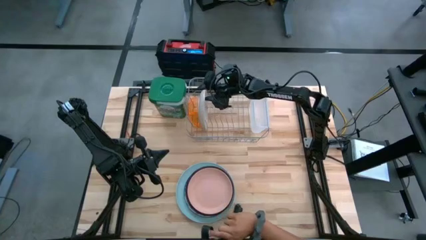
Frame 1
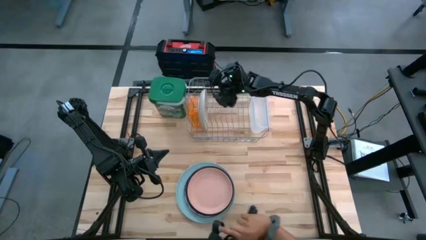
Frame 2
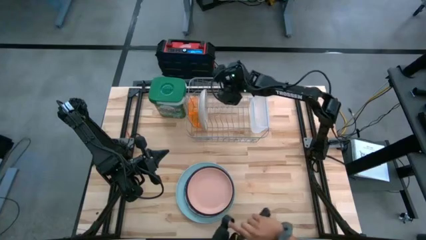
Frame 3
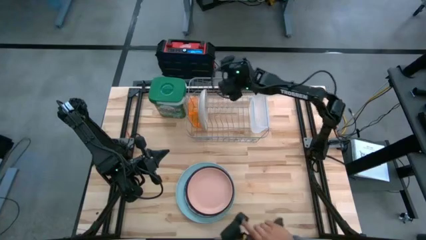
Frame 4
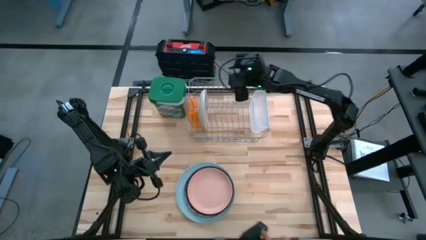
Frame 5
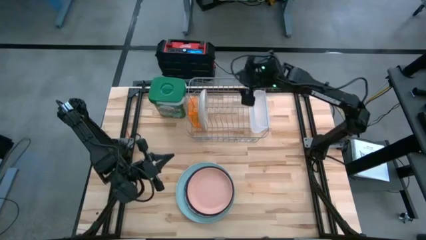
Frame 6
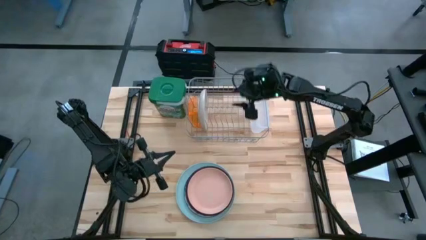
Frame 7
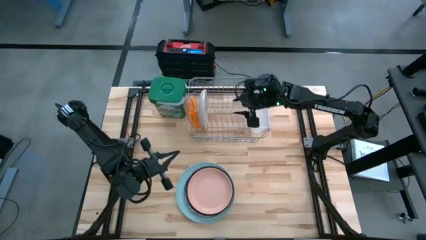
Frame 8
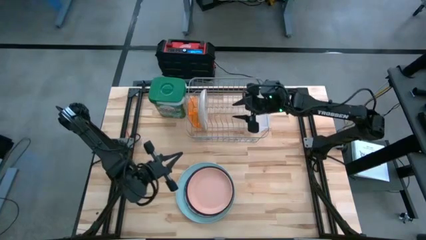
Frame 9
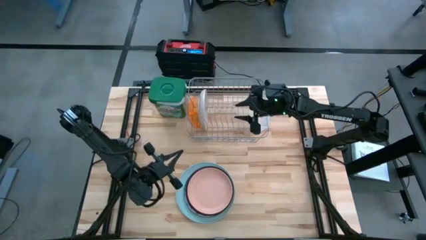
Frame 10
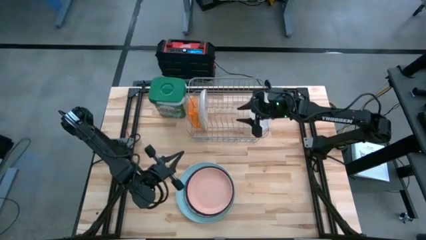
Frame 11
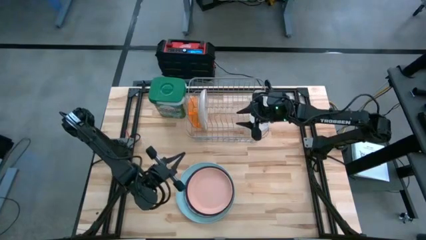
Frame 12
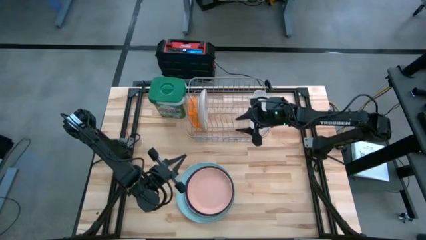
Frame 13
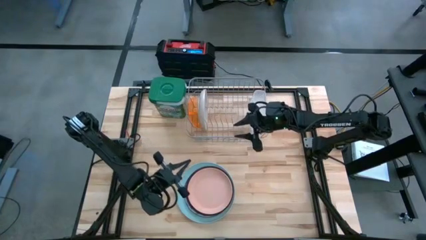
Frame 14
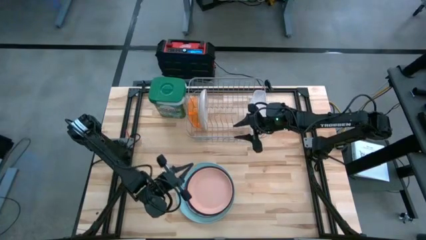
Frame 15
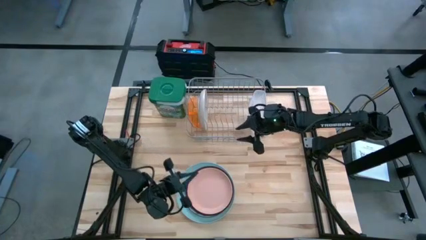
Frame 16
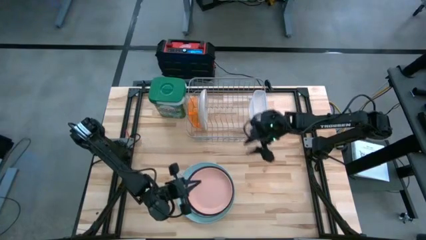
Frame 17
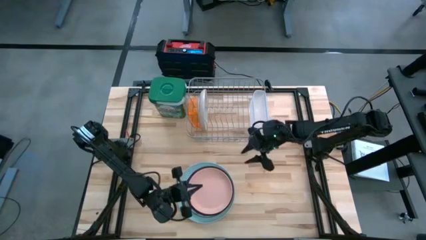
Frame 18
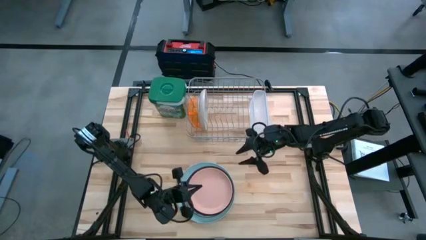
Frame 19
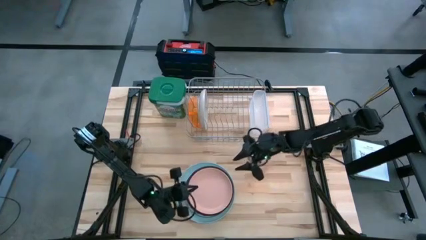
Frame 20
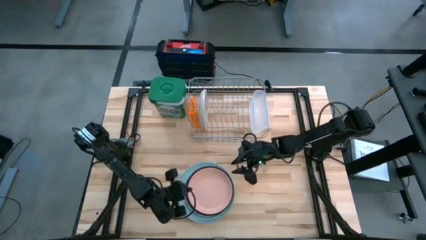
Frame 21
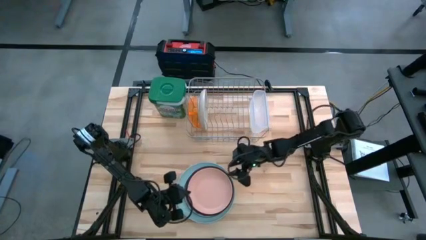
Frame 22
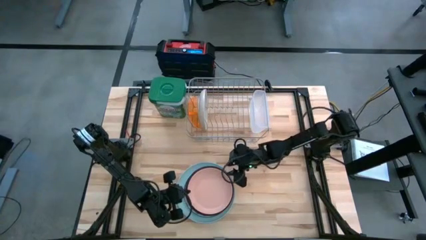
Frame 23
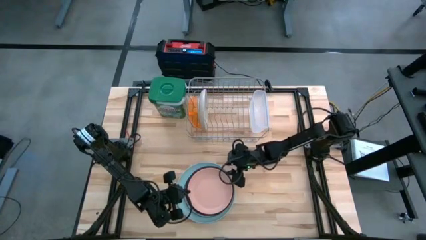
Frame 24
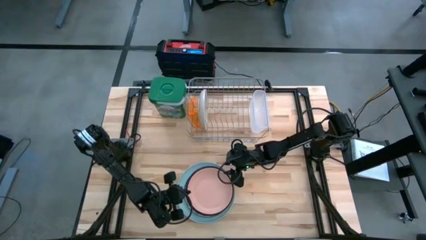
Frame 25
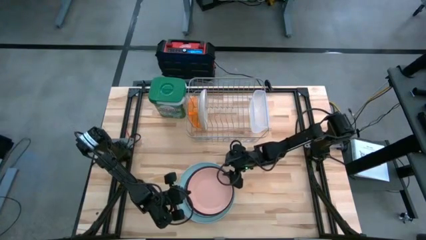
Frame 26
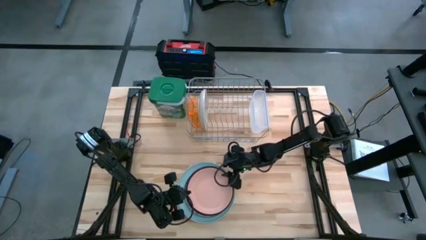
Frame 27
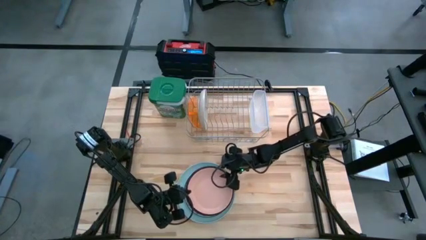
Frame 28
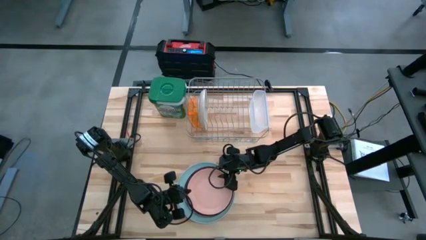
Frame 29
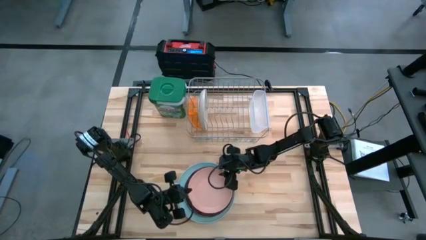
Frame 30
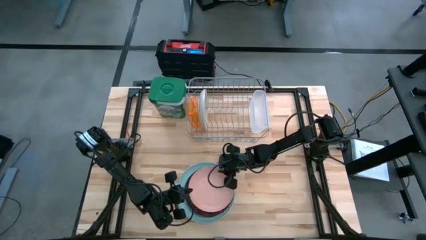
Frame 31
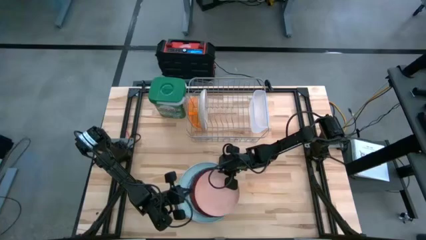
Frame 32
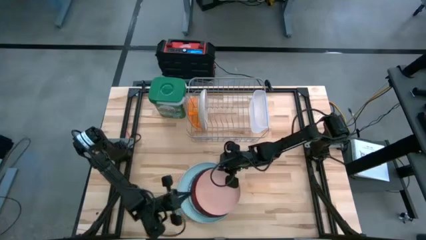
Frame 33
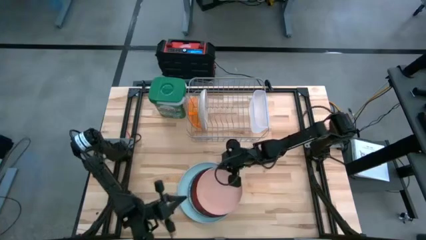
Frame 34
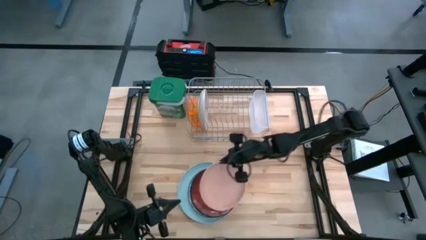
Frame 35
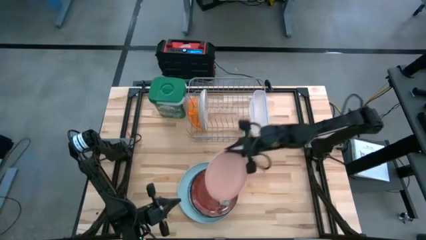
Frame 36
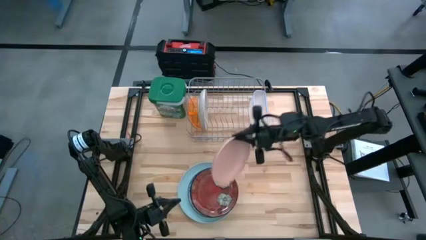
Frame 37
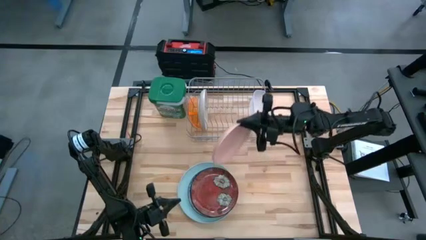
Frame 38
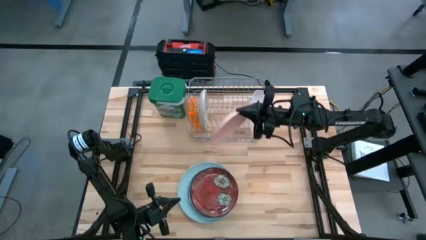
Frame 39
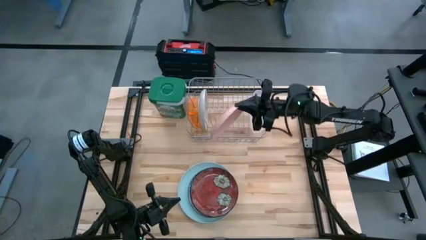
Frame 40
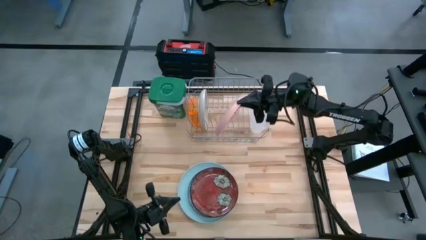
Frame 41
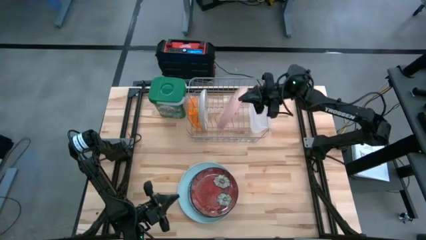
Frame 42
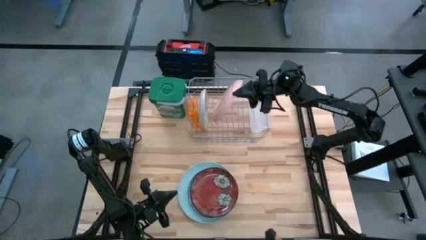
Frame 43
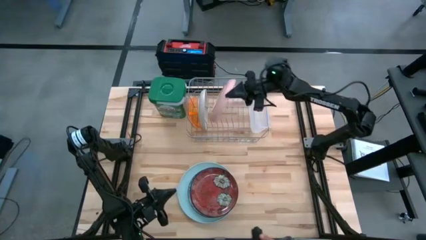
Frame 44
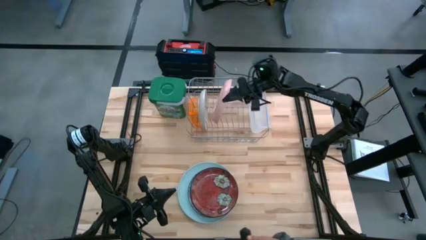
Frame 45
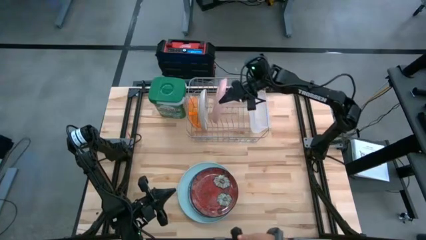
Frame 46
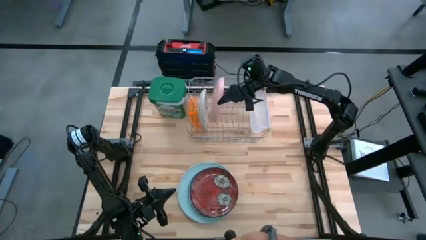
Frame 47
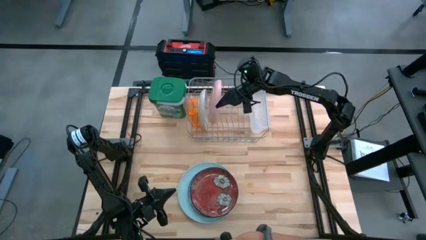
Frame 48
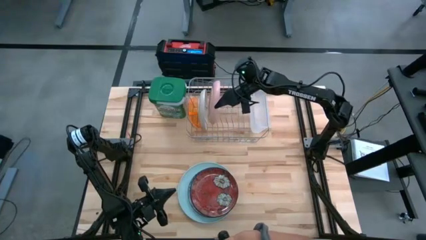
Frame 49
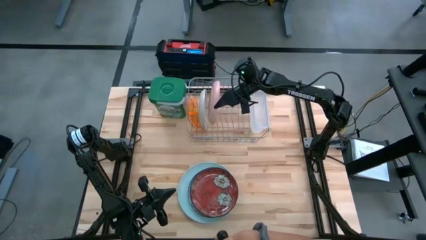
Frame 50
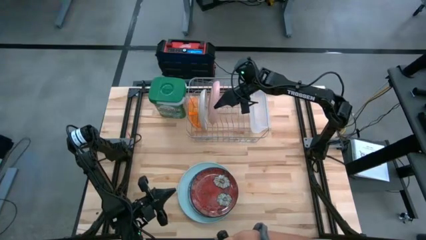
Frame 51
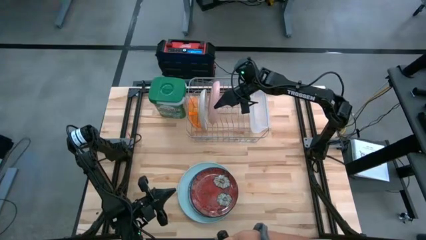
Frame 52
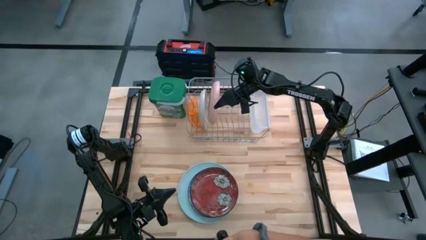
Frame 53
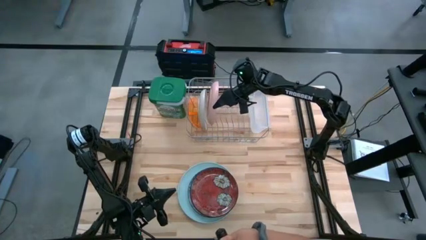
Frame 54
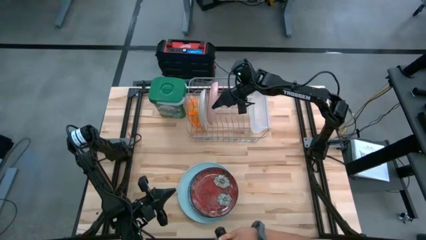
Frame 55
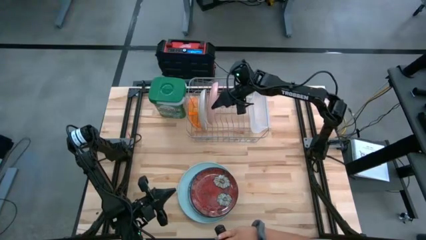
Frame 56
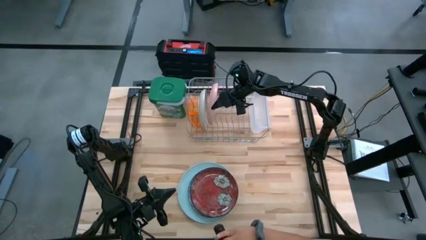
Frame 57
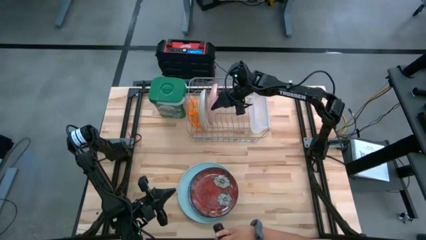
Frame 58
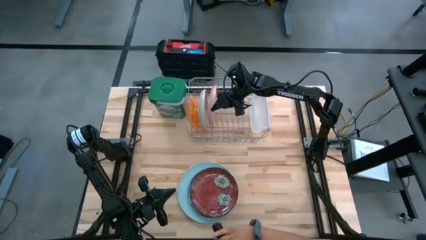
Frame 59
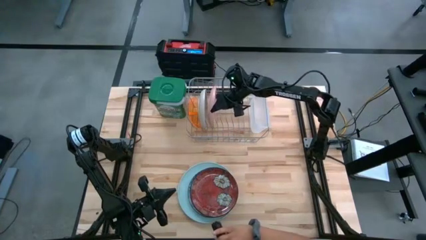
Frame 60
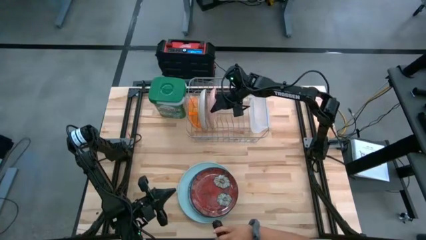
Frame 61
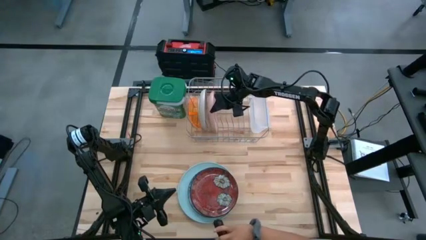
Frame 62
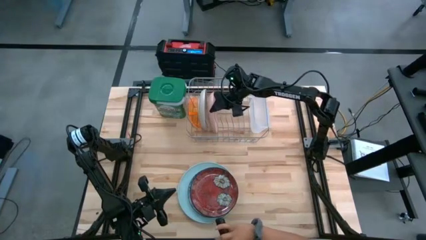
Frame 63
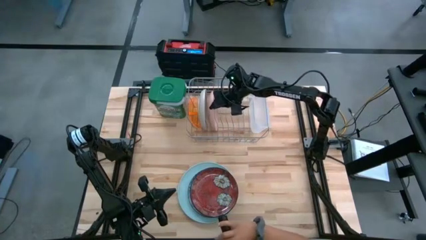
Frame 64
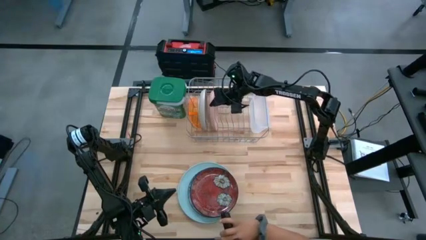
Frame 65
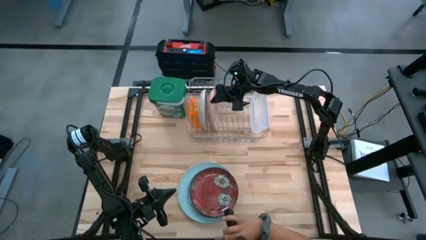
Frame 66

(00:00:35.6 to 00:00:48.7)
Task: Sort dishes
Put the pink plate in the dishwasher rack
